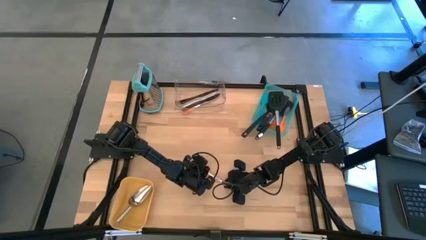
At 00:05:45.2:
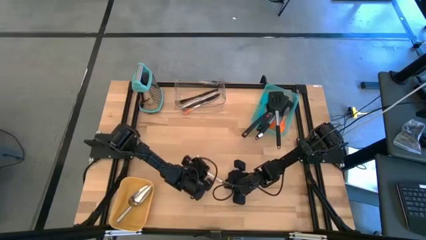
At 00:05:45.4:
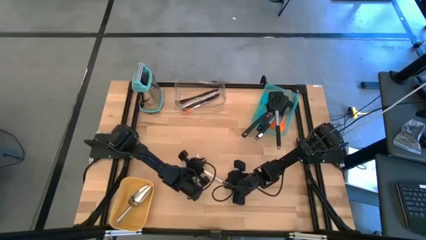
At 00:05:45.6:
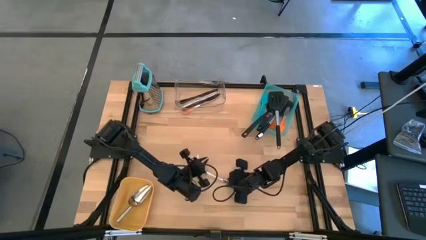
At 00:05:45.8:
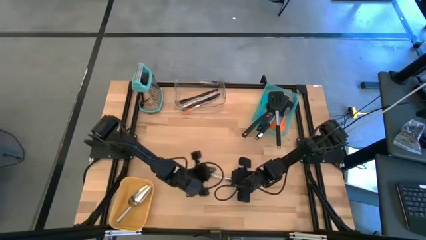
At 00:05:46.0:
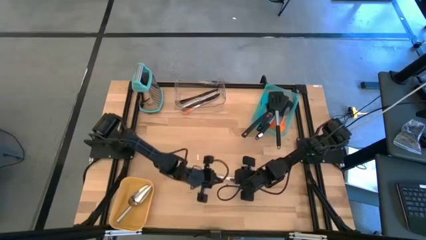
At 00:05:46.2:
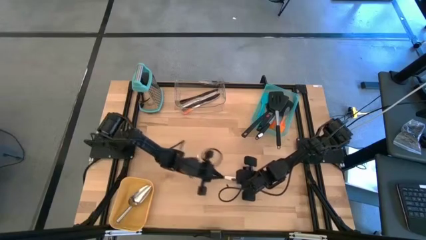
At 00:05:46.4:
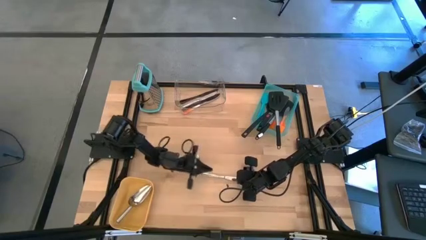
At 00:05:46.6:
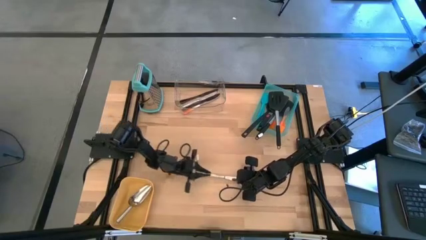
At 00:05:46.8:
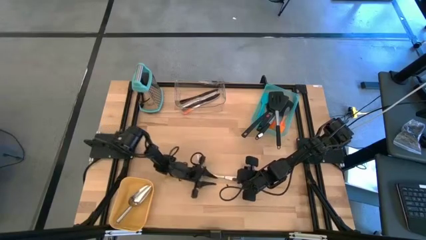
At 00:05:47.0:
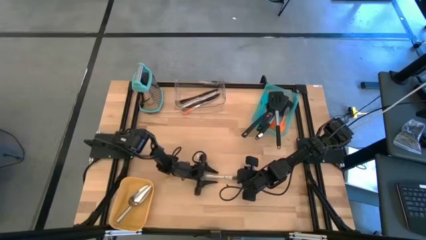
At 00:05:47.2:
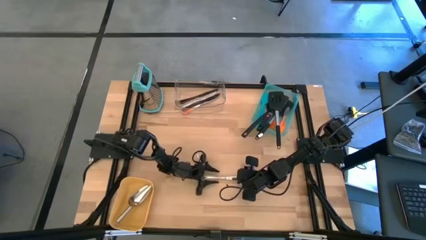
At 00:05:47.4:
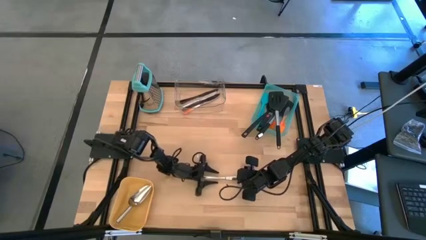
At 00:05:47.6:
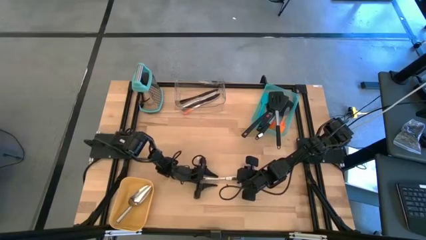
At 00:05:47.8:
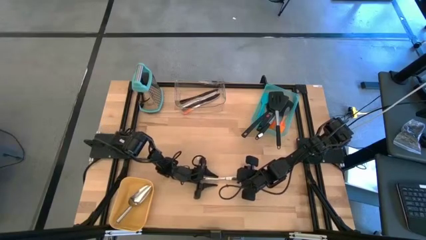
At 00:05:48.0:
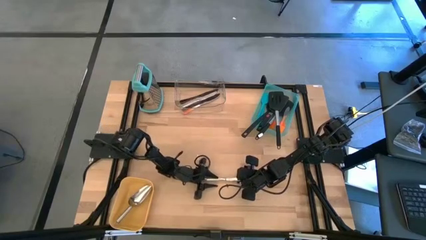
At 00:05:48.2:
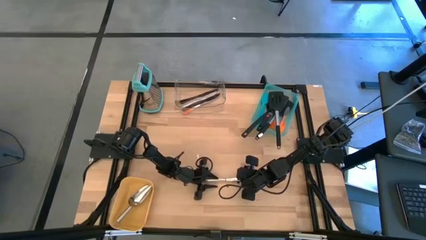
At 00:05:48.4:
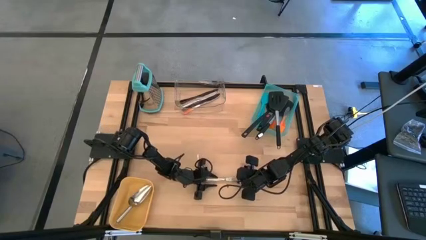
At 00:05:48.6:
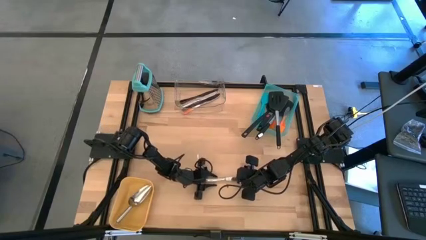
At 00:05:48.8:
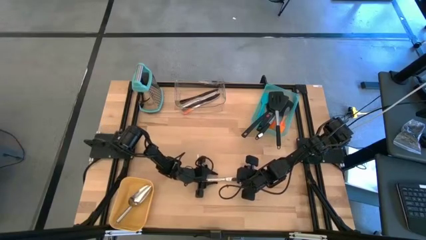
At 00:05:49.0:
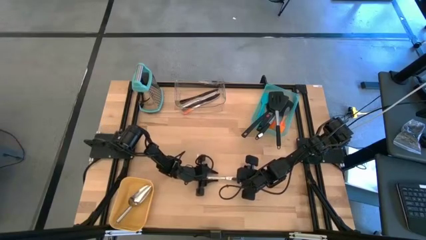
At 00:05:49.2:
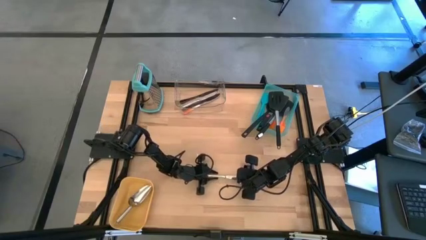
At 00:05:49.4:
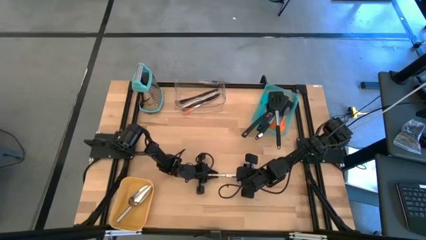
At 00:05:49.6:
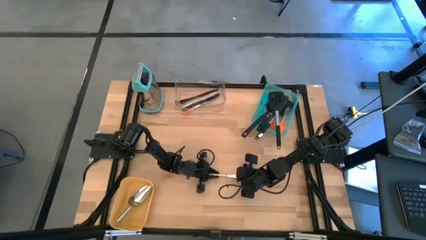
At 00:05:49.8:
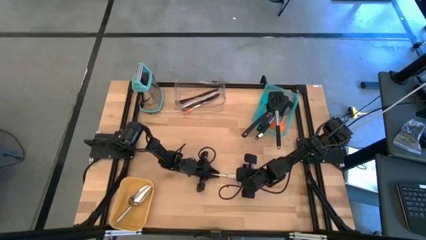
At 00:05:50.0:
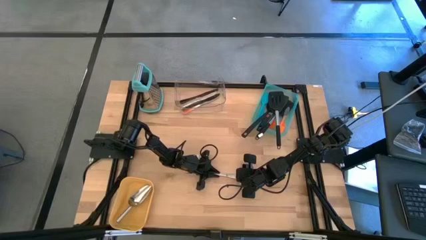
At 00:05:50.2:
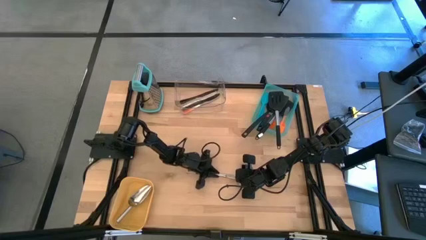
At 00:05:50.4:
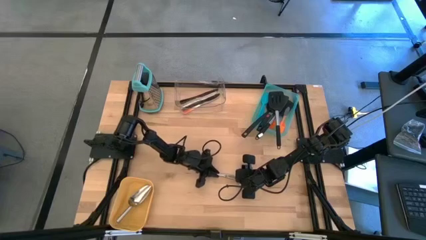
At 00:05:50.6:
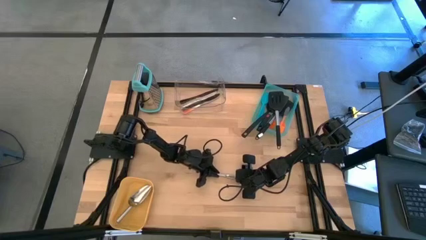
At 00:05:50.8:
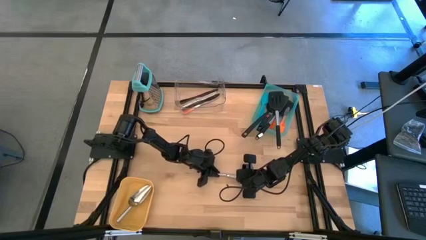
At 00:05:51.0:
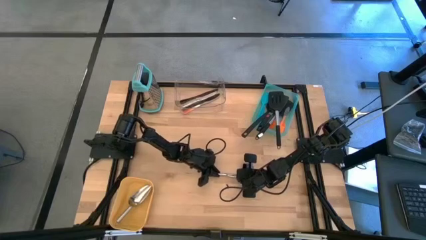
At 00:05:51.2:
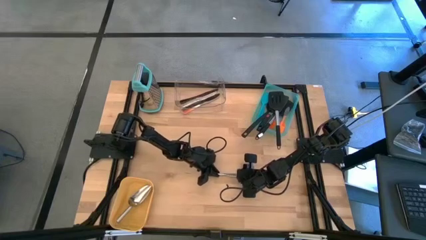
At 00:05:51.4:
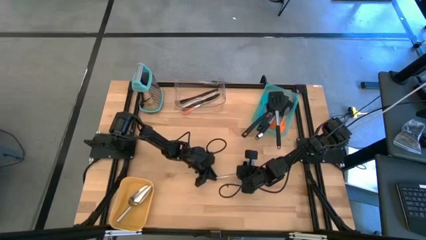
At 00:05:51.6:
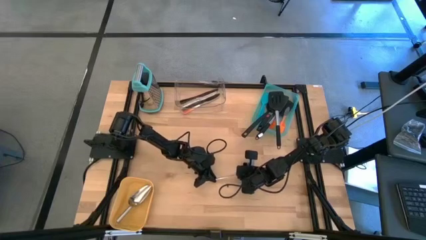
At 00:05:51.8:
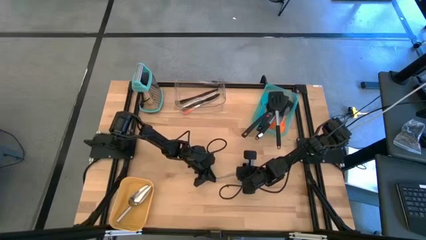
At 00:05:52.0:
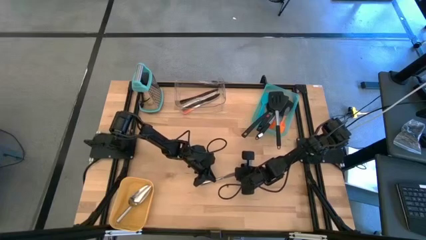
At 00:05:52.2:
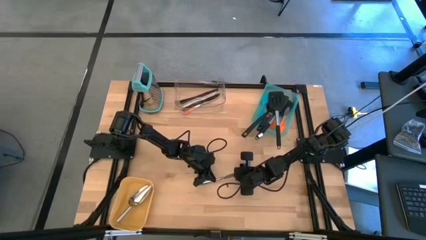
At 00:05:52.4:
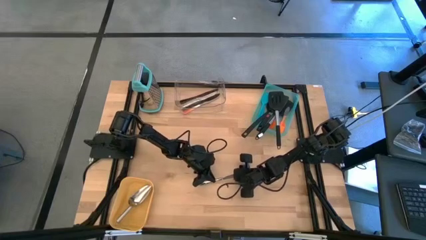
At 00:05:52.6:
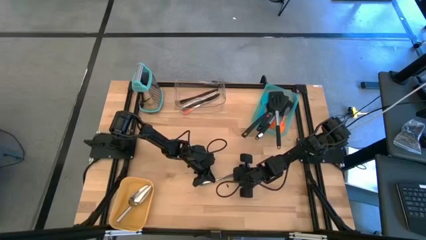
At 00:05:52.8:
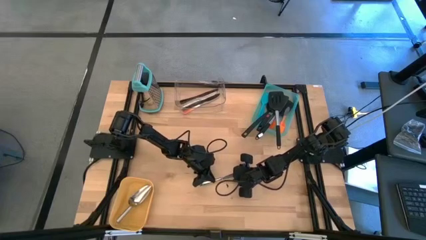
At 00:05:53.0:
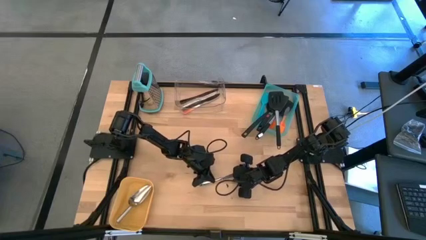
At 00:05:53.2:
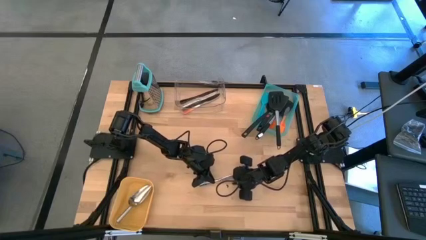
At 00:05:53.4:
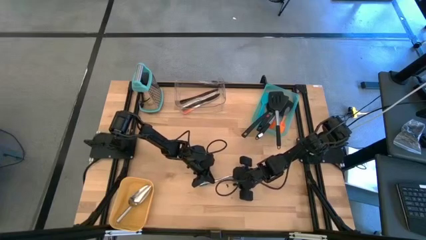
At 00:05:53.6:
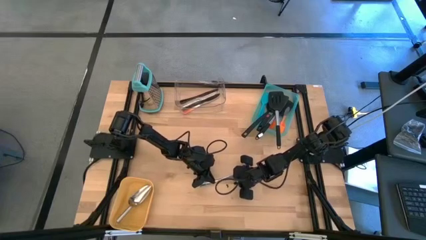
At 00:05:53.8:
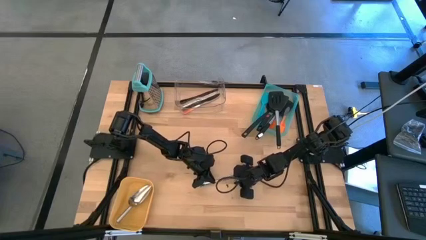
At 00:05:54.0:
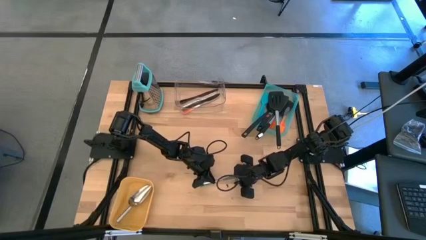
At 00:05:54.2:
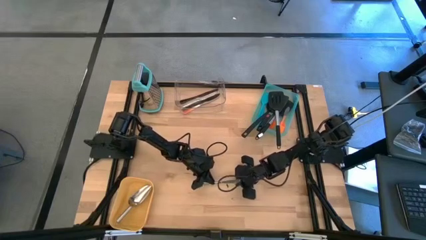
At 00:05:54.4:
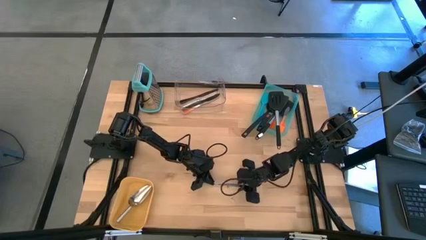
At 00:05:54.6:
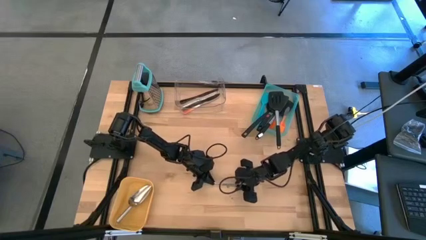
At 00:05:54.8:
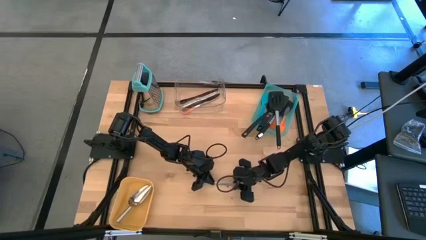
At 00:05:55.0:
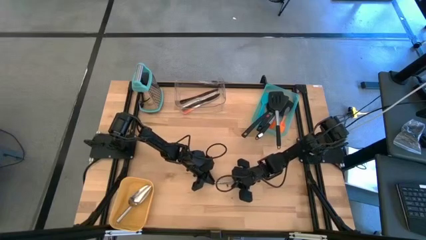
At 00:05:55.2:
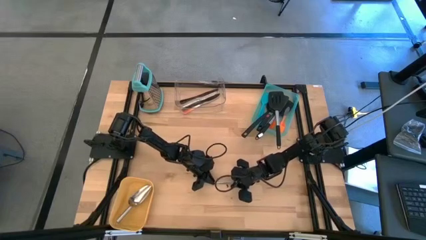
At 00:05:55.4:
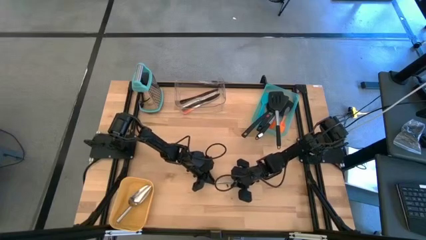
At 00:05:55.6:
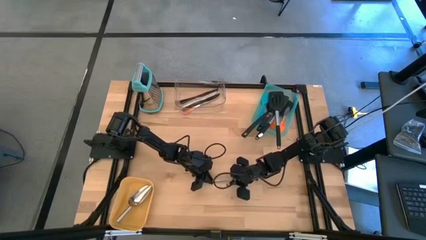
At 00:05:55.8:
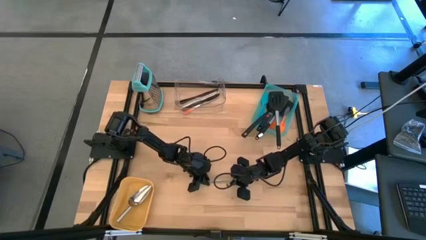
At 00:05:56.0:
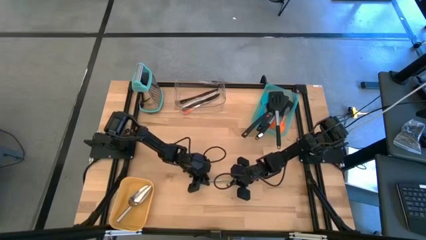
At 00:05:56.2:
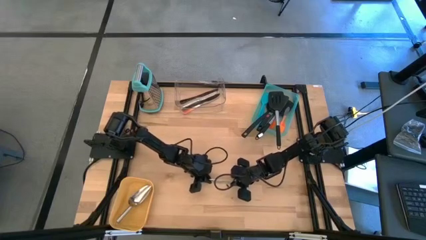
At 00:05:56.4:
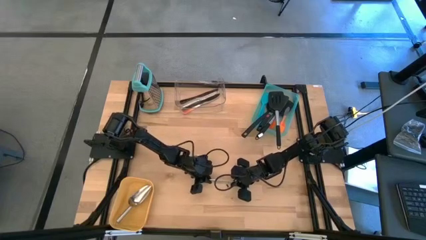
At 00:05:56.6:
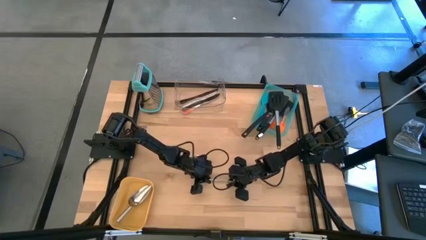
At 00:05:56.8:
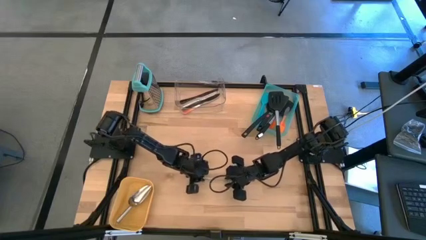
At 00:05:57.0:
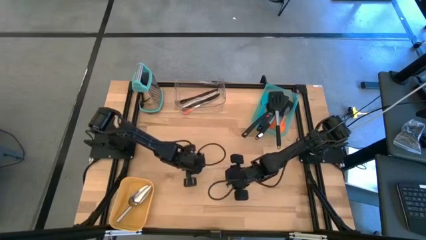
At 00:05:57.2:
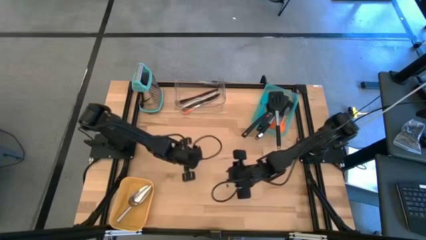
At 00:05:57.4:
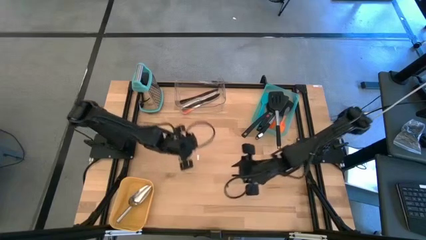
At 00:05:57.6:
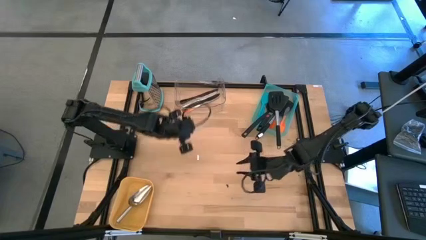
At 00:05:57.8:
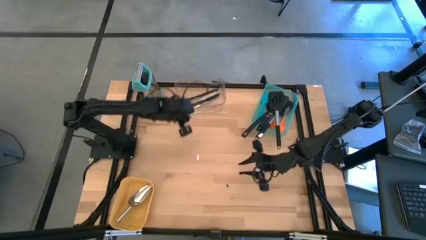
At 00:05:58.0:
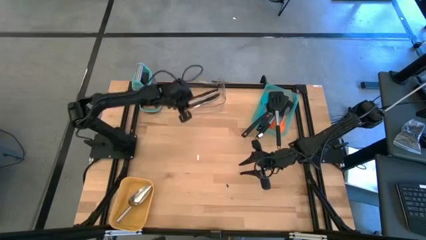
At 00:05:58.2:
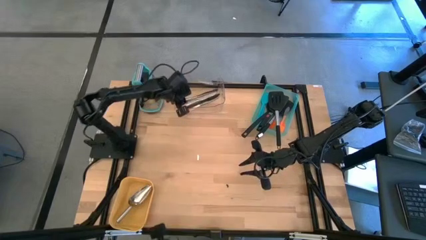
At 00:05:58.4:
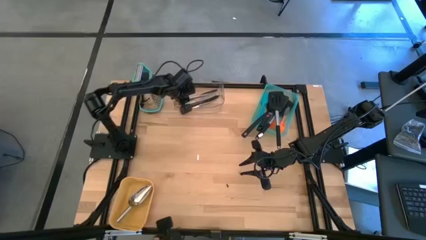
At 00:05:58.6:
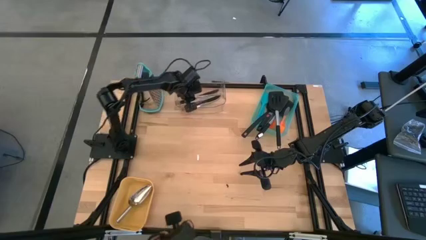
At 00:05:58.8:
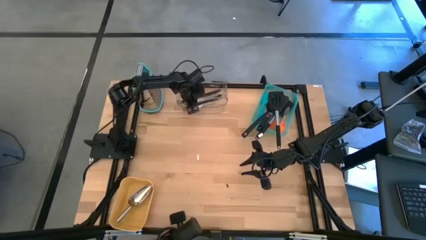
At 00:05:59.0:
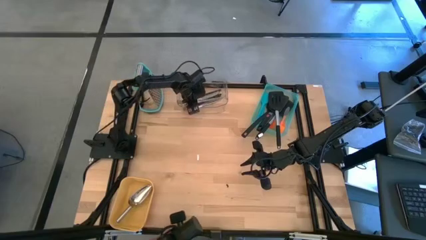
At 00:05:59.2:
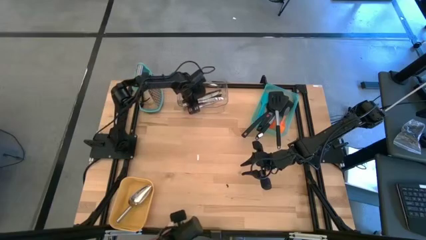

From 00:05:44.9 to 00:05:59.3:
Task: Pick & Place Kitchen Items
Put the silver table knife into the transparent bin

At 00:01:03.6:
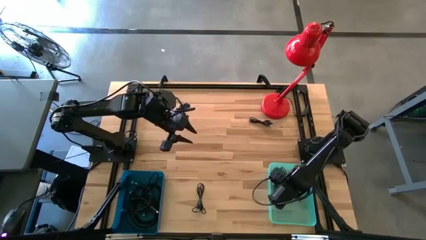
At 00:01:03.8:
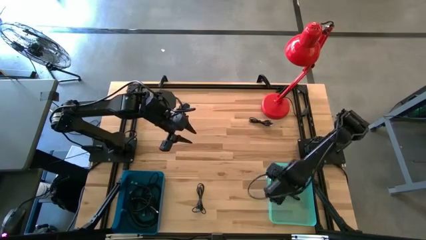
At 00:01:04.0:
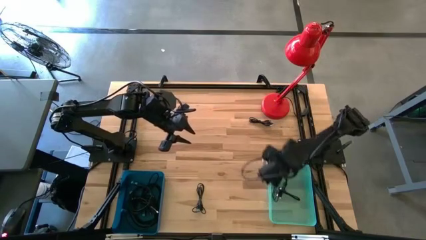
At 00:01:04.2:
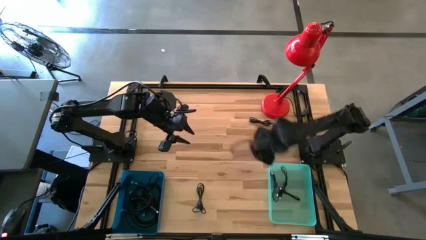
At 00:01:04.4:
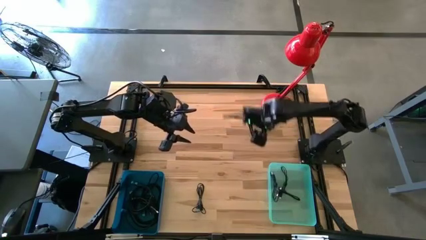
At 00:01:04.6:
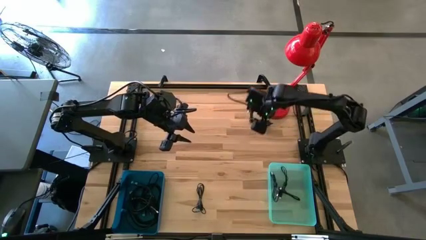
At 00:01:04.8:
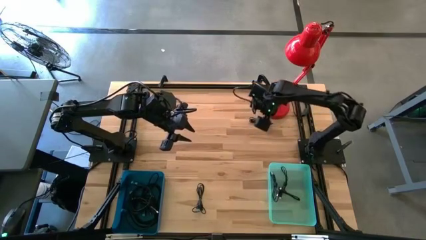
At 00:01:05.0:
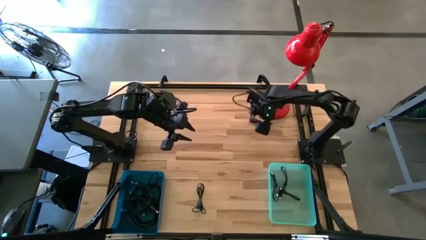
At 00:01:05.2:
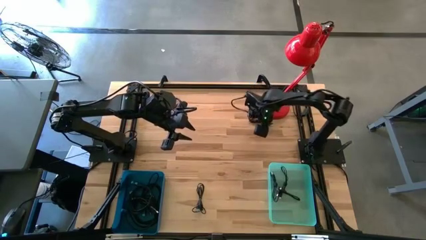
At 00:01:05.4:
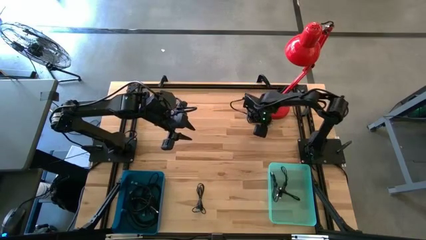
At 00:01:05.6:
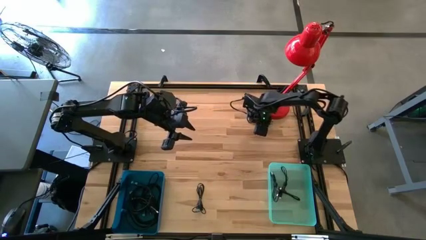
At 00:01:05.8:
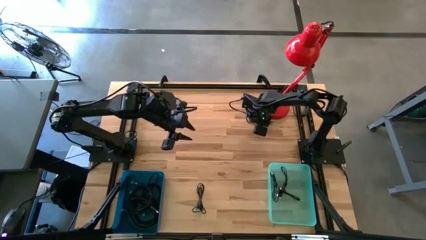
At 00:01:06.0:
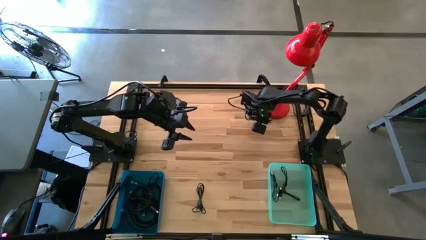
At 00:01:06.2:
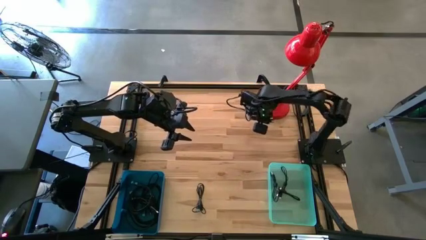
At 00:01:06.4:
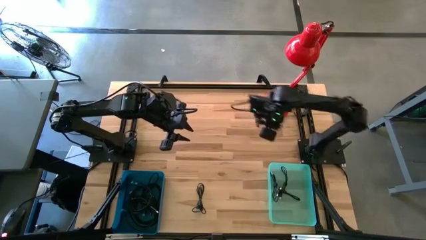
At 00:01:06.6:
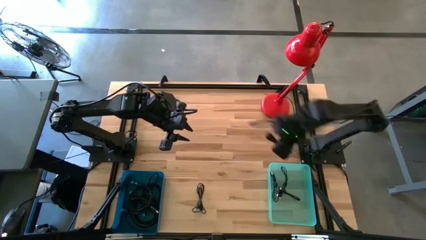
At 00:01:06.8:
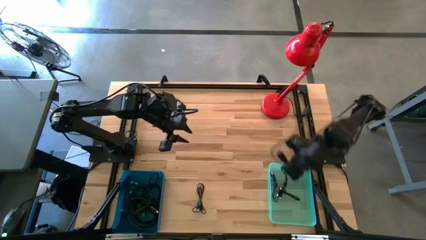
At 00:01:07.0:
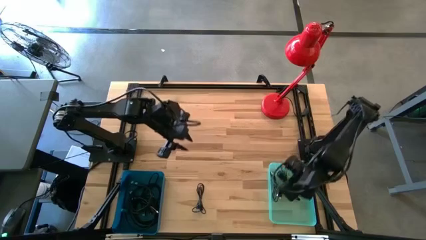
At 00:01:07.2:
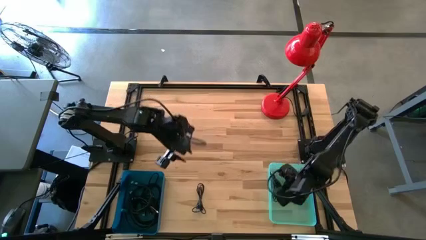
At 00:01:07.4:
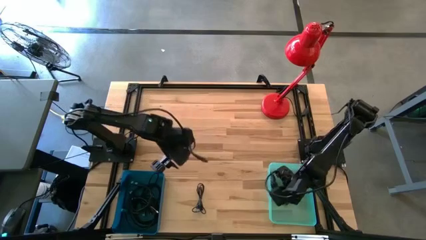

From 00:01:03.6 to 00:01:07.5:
Task: Pick & Place USB Port
Put the black charger cable into the light blue bin
